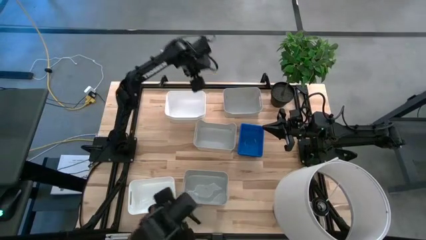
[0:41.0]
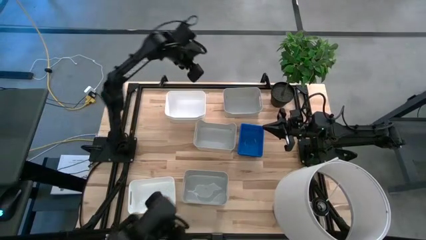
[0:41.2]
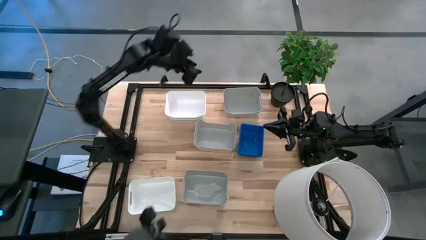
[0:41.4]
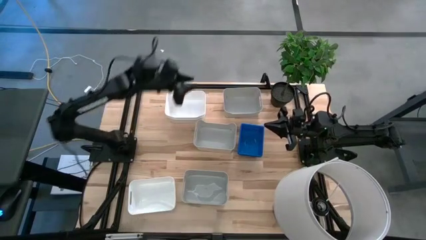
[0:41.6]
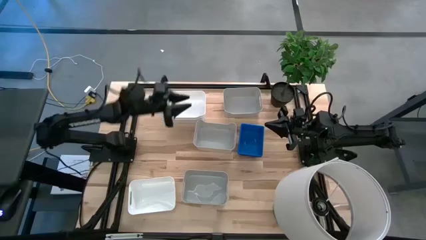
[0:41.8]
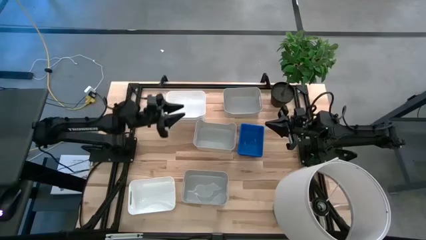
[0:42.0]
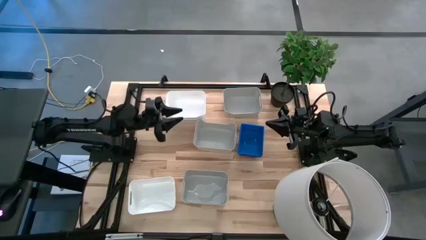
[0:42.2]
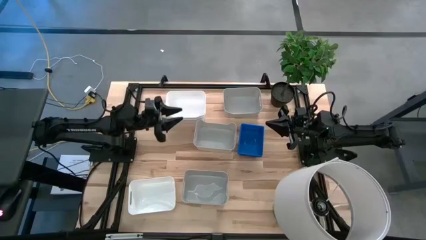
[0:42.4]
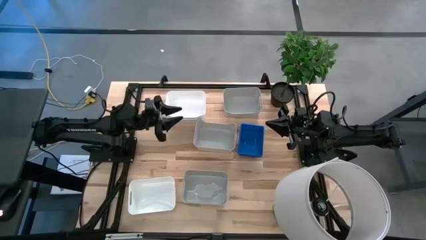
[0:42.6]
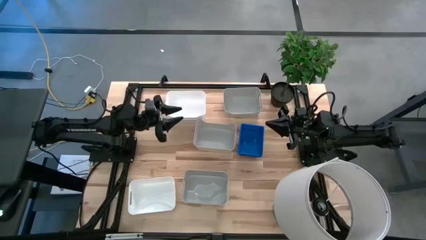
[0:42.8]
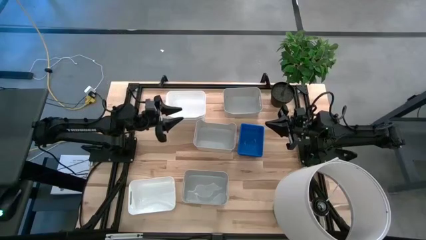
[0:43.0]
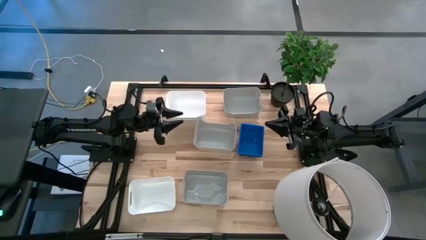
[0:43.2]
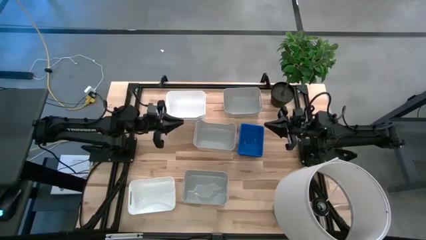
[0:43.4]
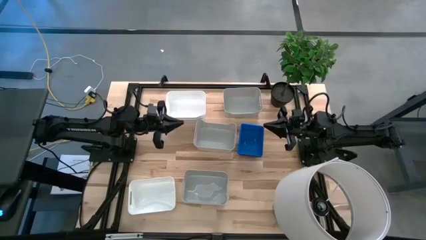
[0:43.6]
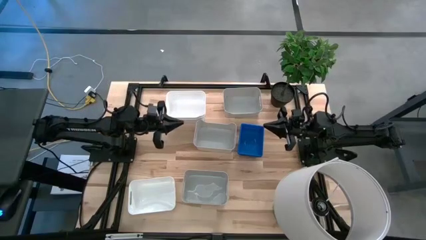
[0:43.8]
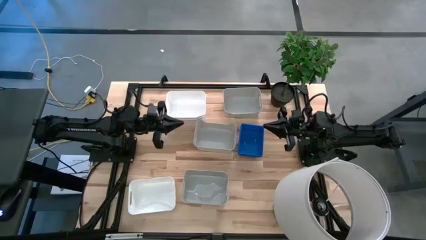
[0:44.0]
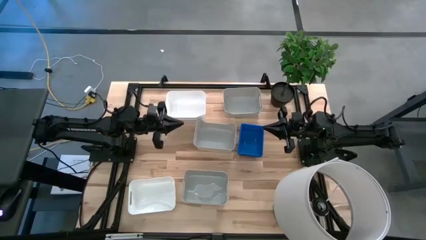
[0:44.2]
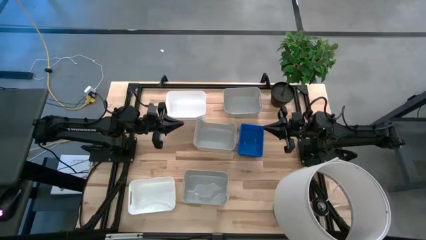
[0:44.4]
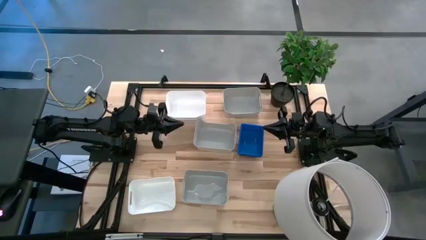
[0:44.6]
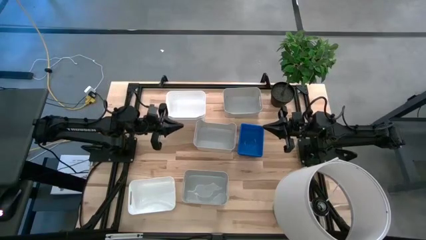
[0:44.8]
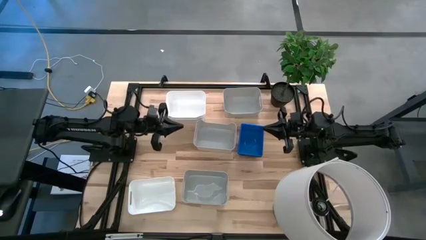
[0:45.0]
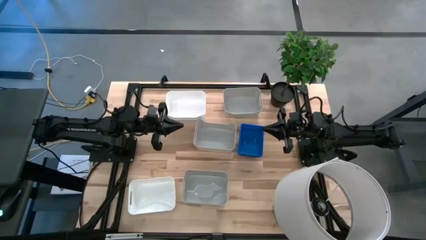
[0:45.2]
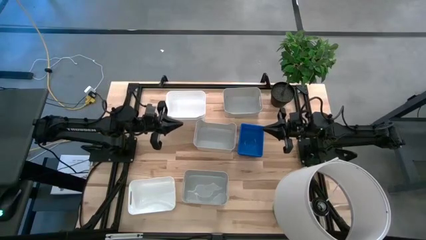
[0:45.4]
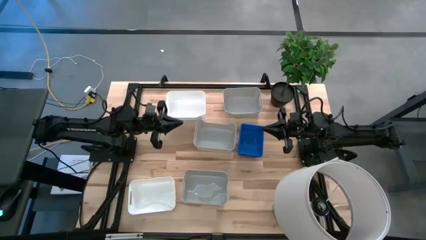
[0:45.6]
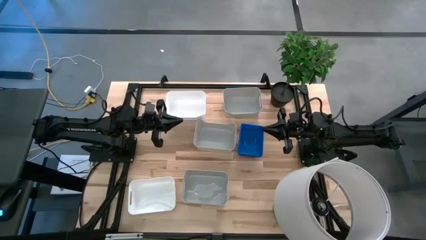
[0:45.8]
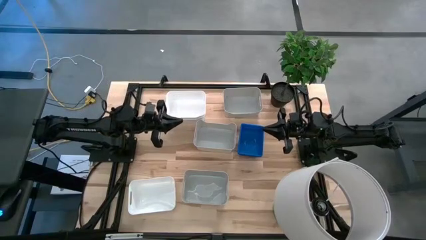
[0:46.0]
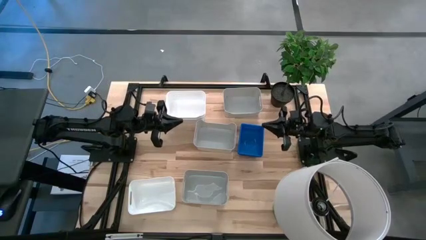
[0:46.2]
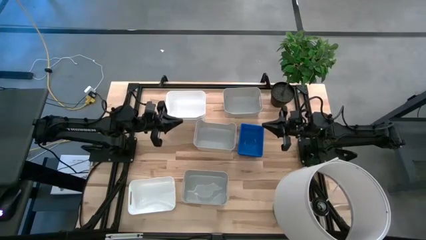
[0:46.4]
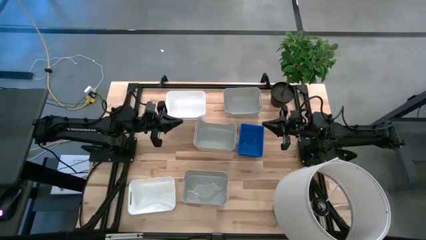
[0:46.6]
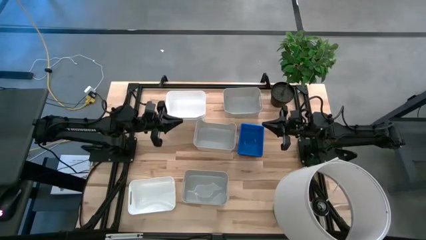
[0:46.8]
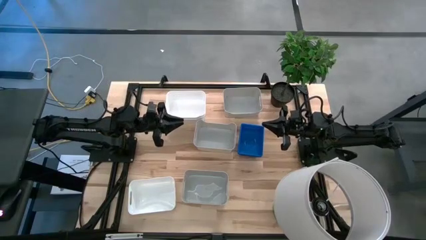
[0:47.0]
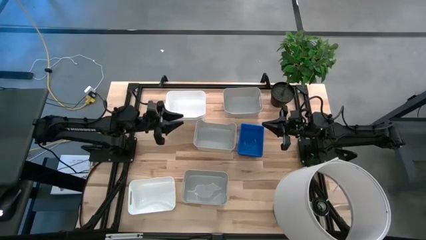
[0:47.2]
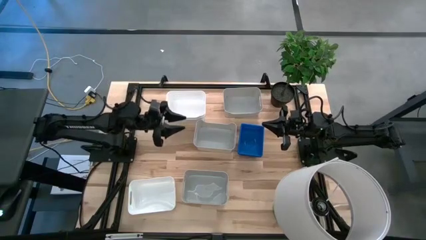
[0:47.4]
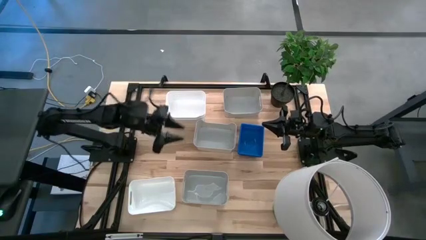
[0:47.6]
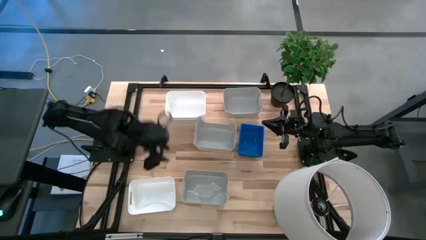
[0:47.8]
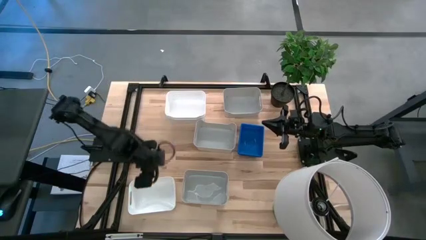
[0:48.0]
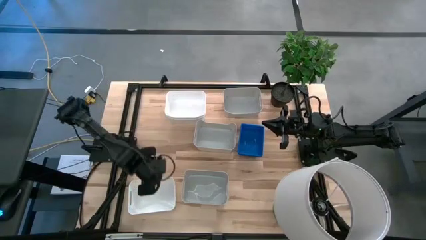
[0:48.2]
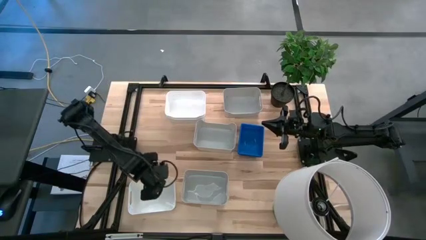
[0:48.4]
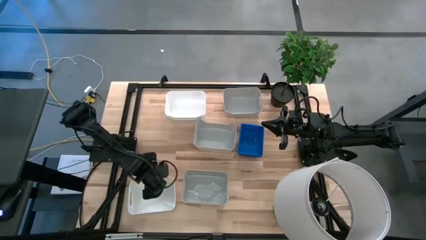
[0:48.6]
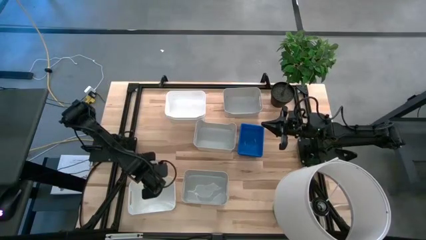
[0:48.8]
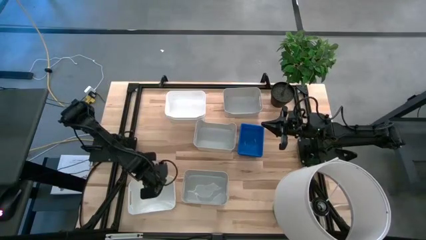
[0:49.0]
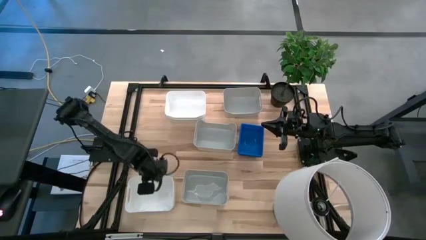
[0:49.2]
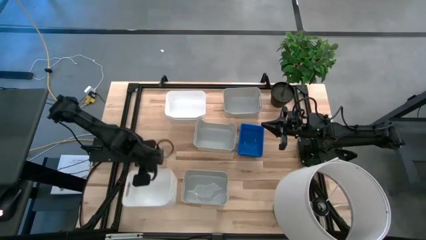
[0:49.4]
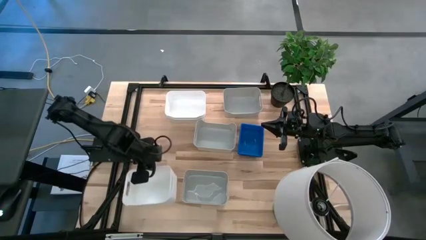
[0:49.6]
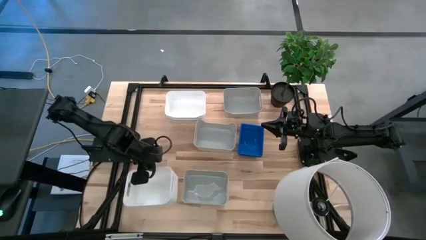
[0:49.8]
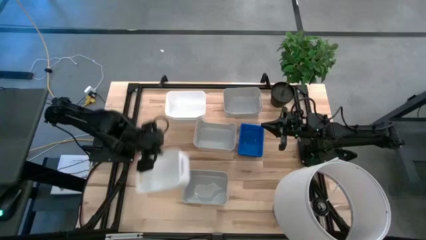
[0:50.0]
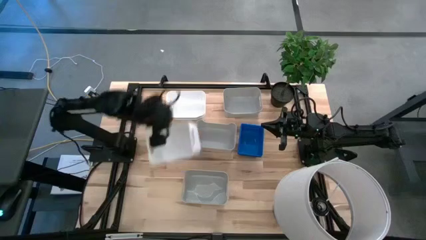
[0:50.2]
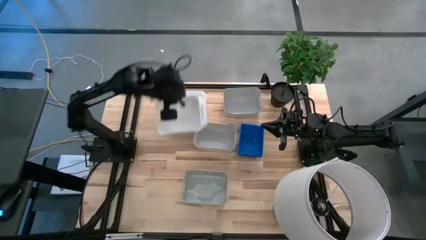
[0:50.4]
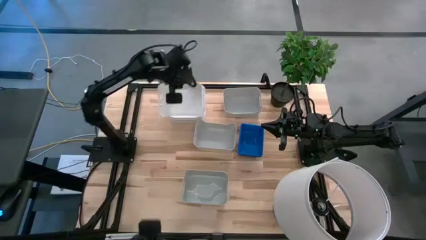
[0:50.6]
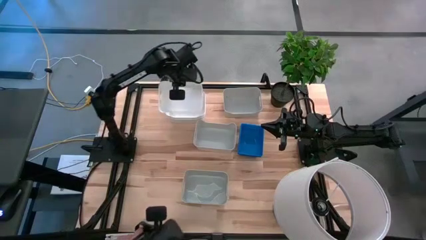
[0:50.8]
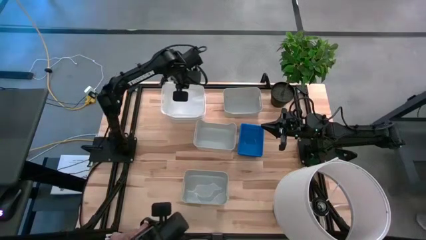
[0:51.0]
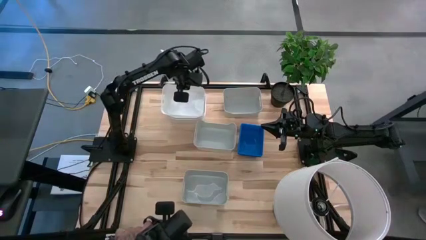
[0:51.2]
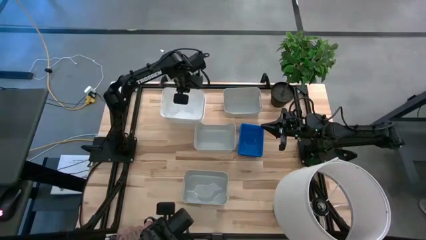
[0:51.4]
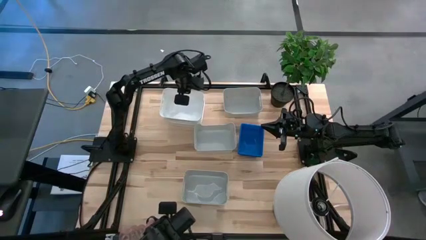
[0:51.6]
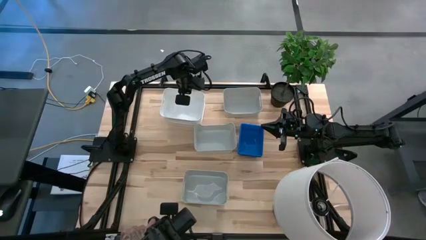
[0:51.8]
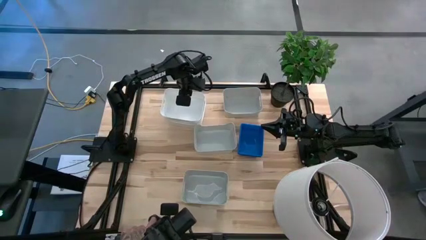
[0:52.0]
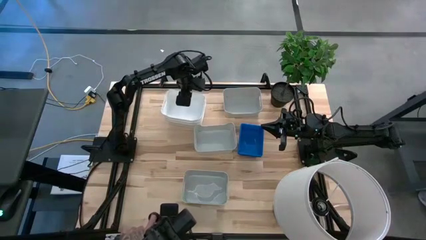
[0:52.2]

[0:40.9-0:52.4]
Stack the white bin into the top white bin
